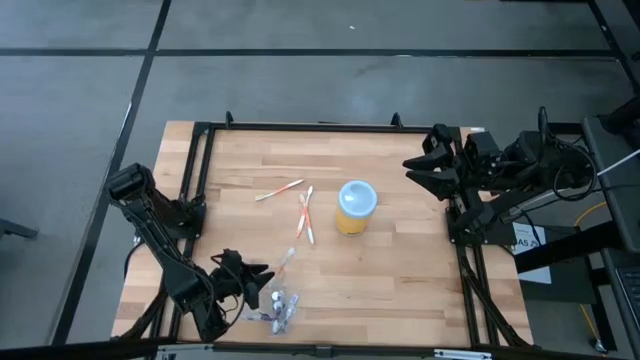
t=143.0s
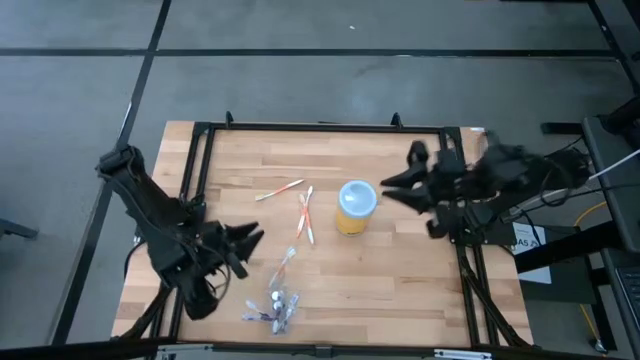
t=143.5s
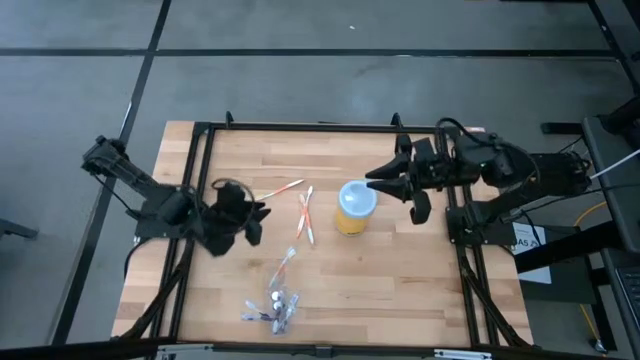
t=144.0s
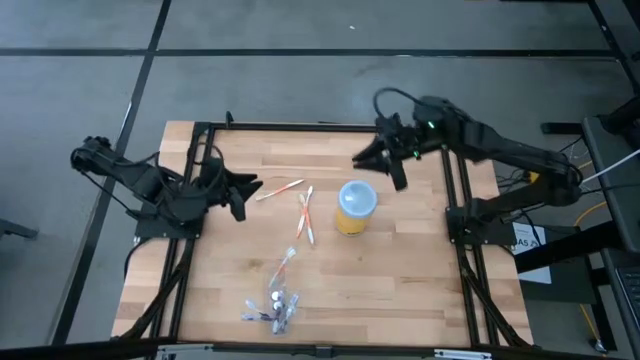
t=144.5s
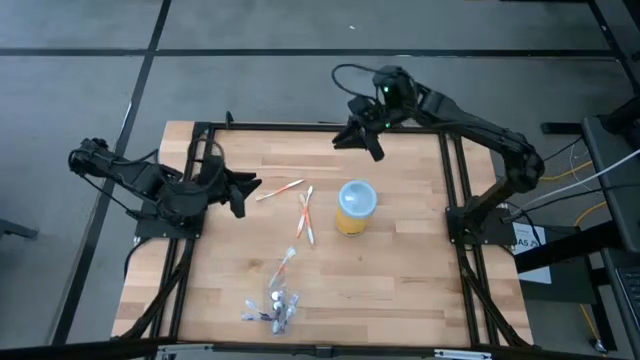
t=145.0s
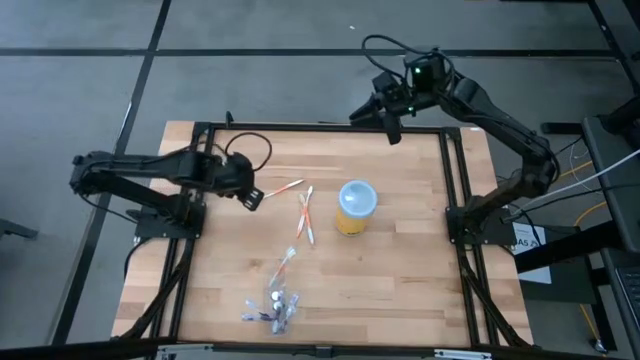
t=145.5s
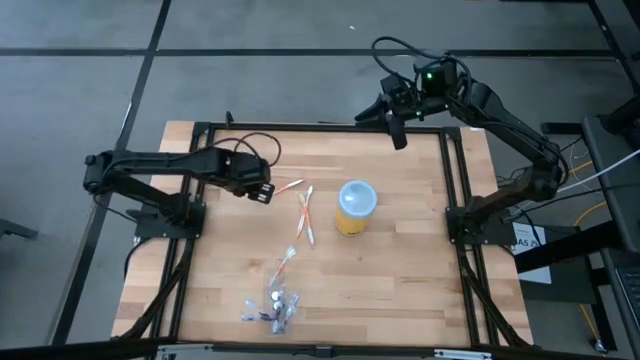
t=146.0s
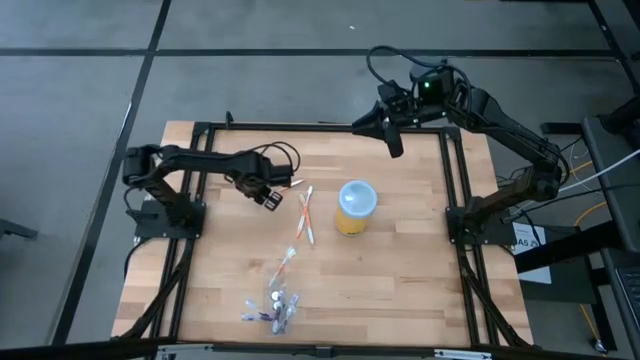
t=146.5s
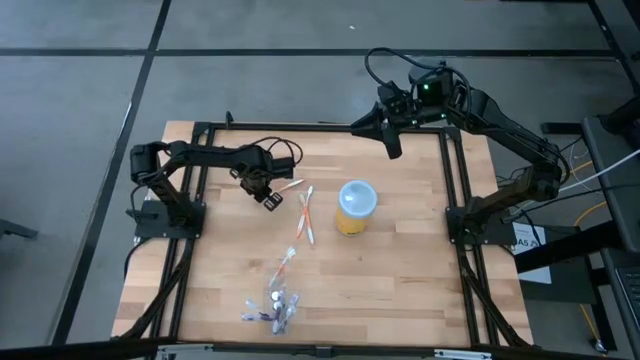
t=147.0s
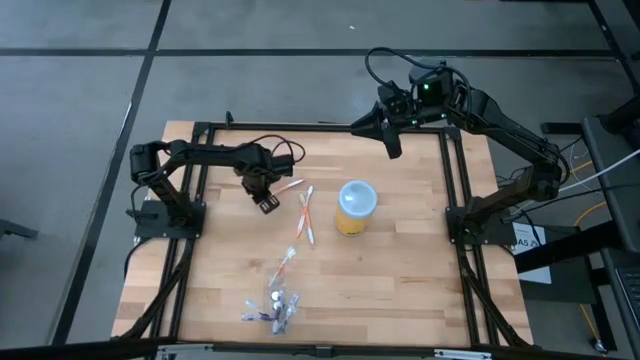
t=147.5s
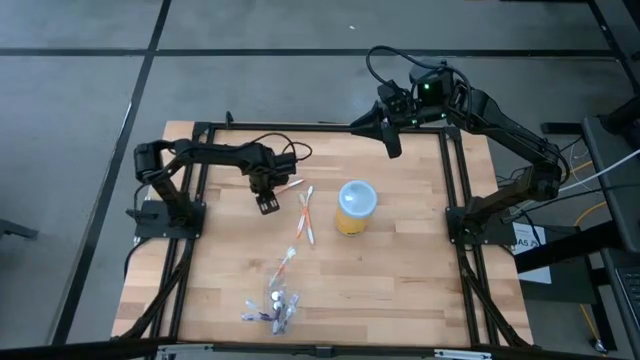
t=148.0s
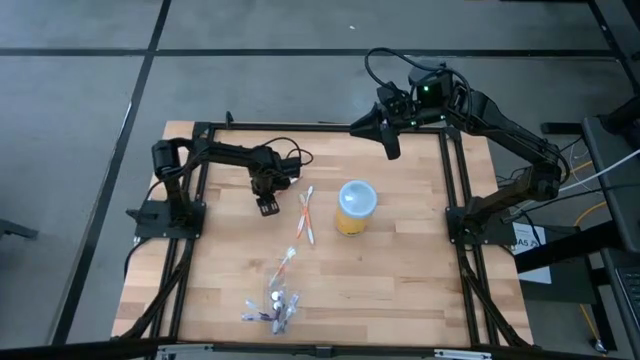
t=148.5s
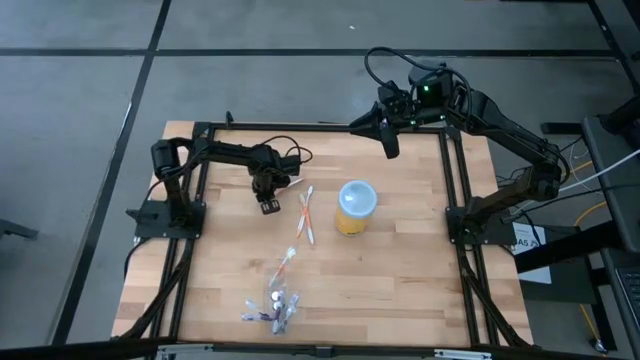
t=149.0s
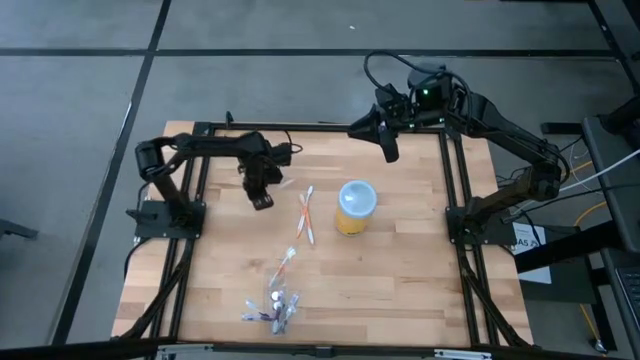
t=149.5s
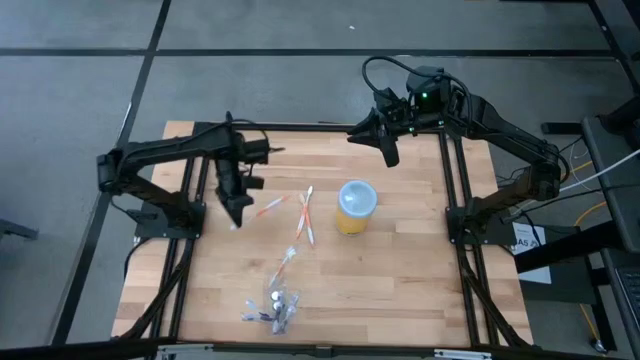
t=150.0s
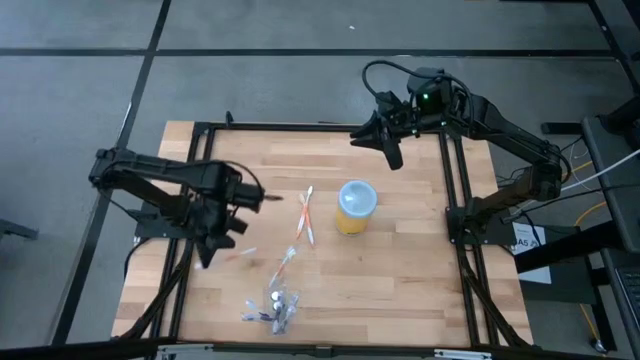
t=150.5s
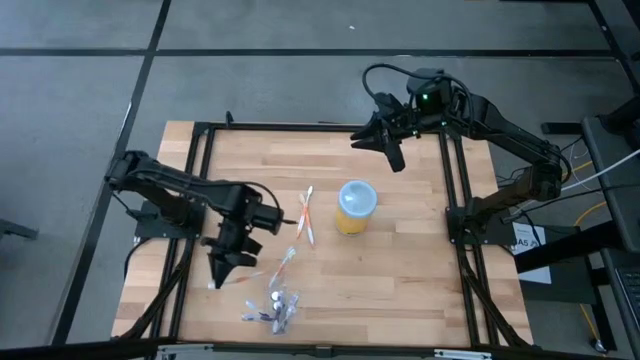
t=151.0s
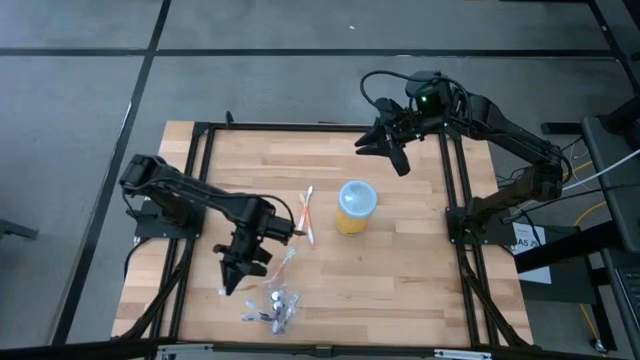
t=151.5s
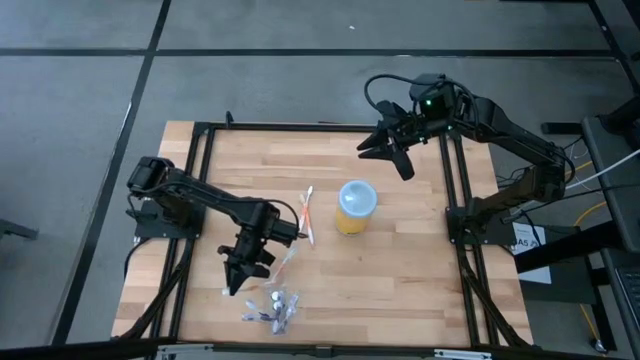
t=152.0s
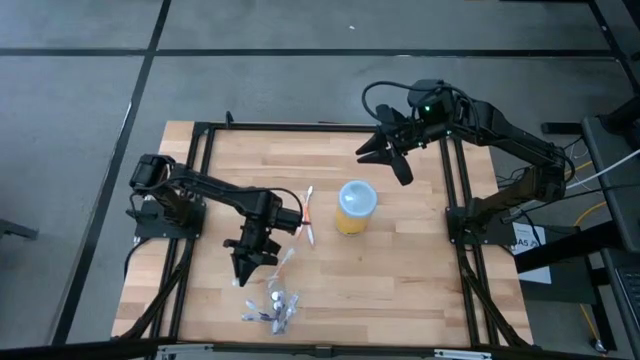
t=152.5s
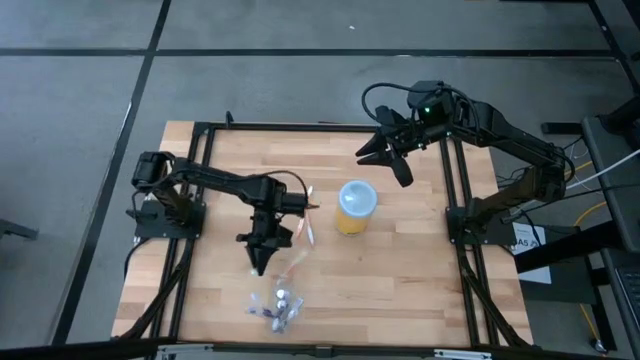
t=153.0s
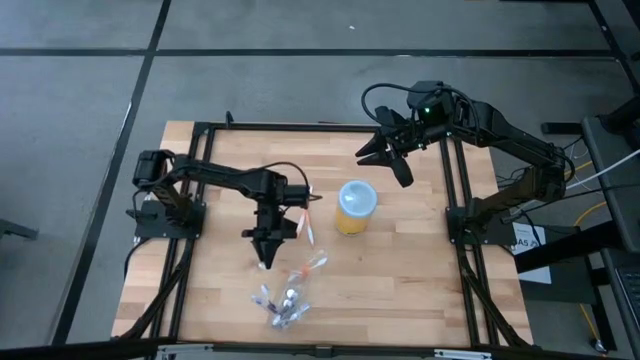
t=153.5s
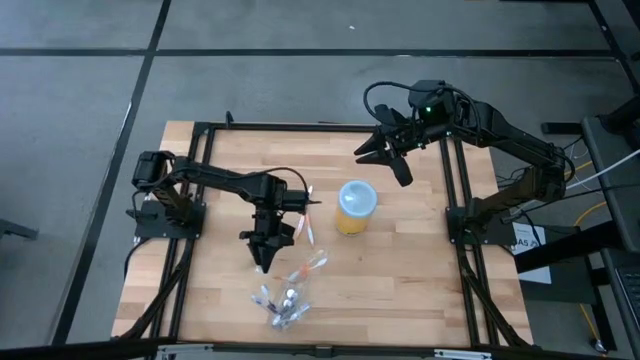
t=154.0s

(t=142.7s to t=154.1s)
Task: Pick & Place toothbrushing station
Put the top orange toothbrush into the left side of the transparent organizer

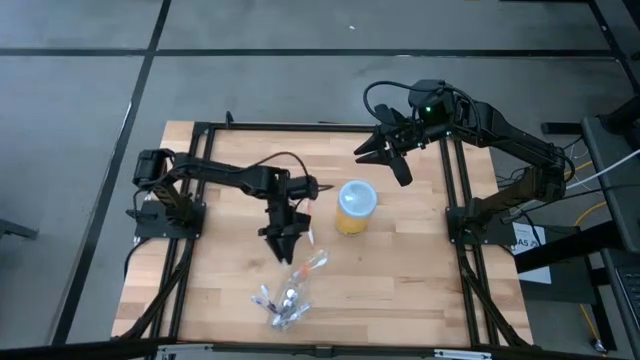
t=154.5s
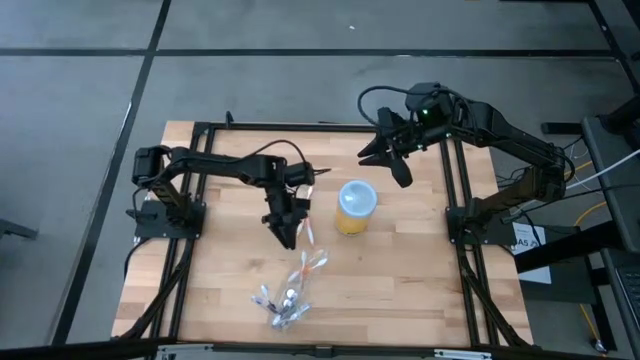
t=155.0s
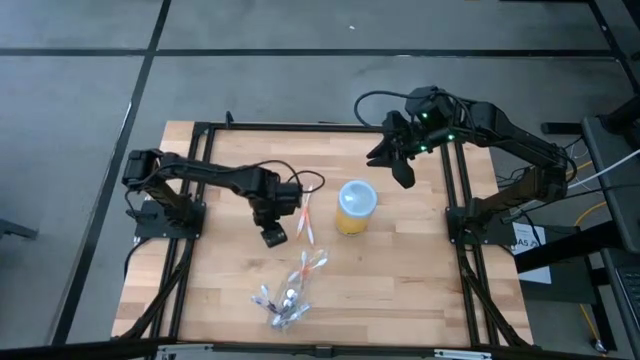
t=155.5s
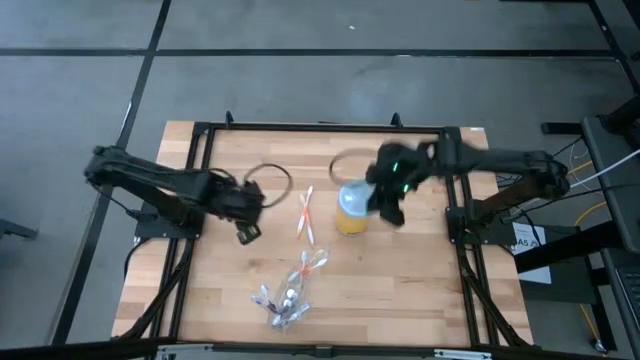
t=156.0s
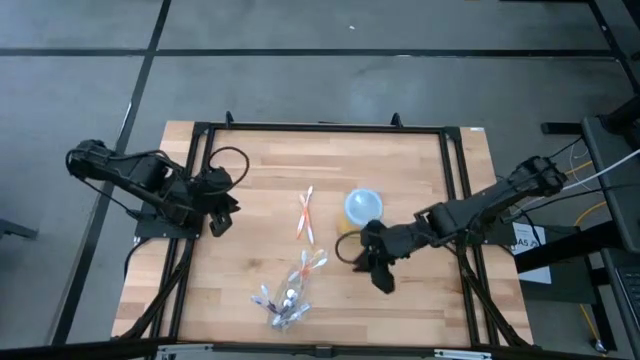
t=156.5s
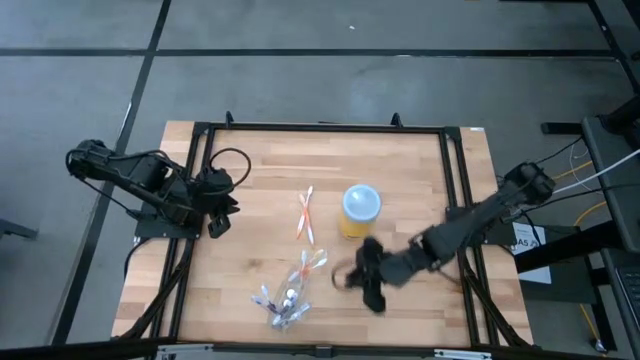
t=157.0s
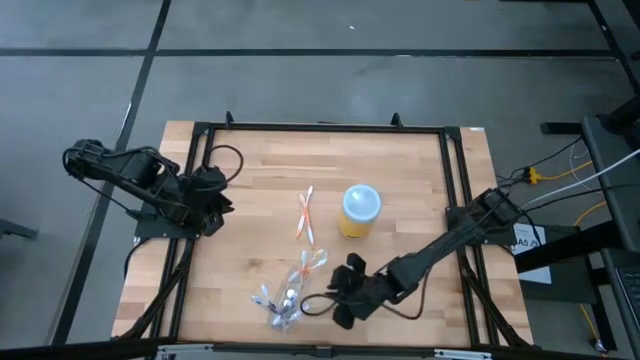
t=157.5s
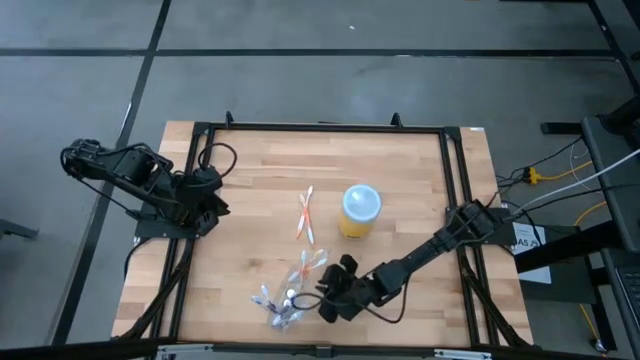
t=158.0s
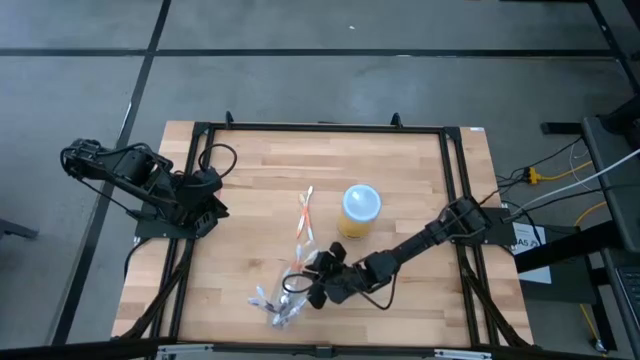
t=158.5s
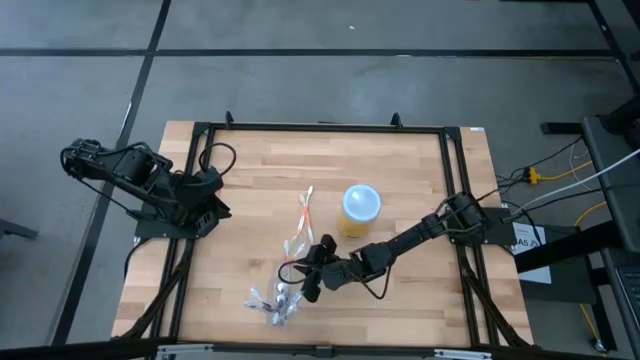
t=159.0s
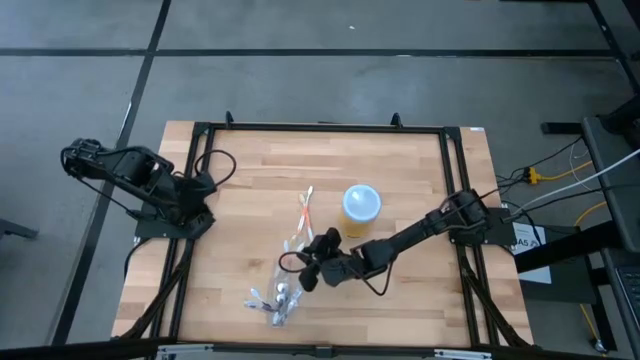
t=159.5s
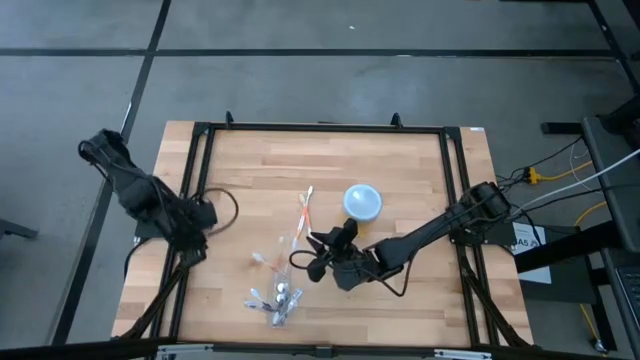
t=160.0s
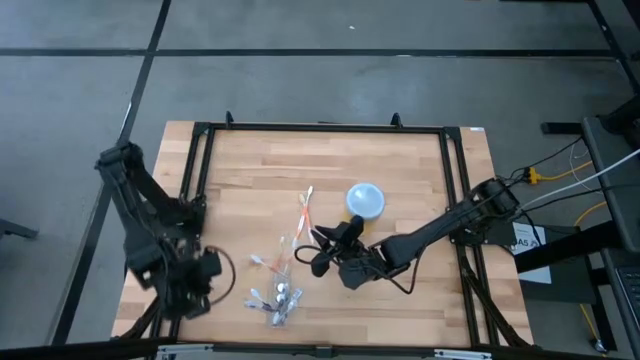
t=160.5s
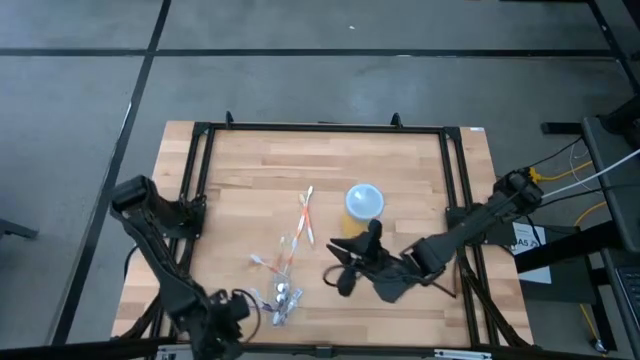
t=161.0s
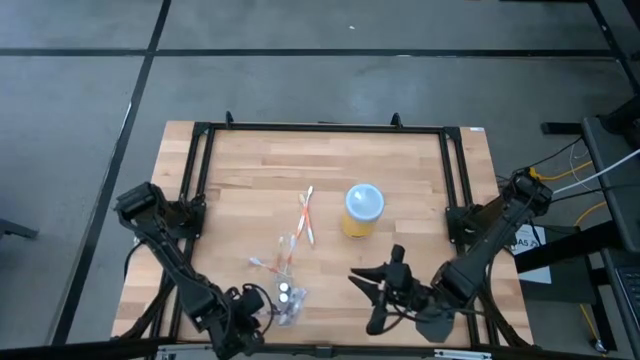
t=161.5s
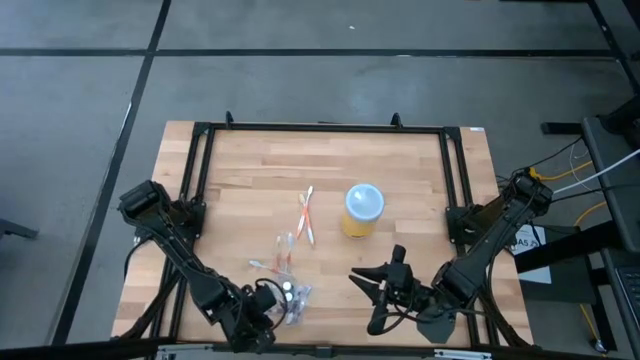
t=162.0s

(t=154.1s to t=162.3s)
Adjust the toothbrush holder

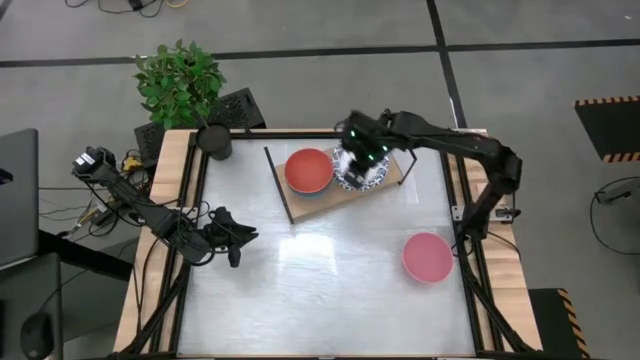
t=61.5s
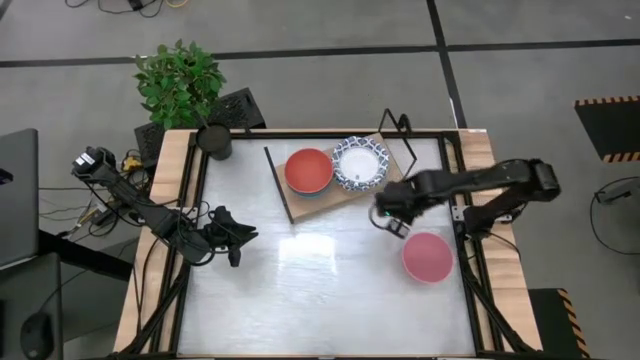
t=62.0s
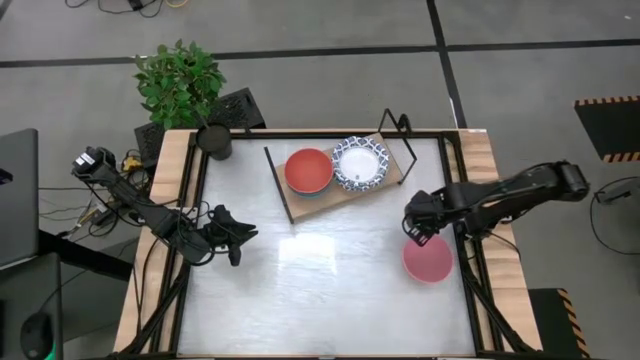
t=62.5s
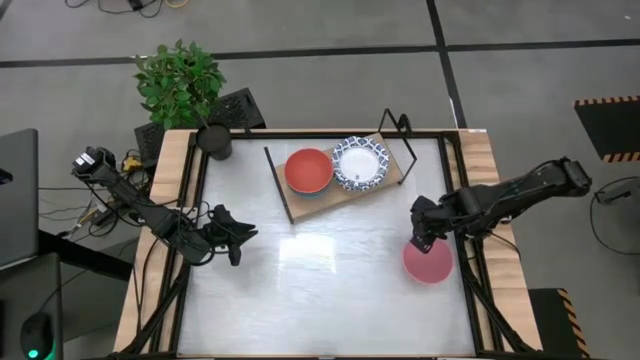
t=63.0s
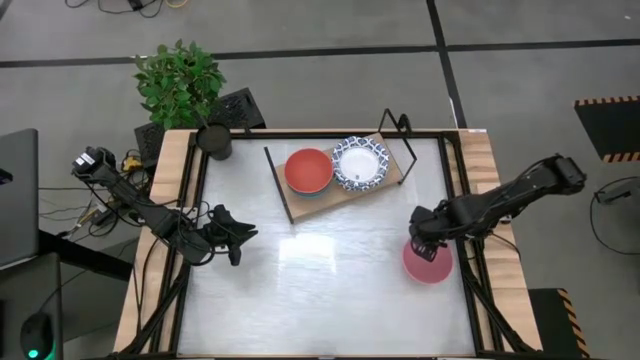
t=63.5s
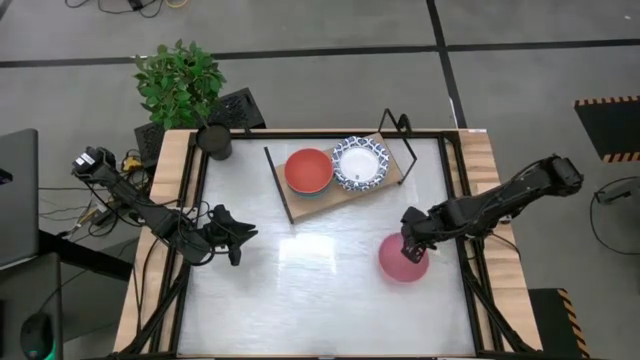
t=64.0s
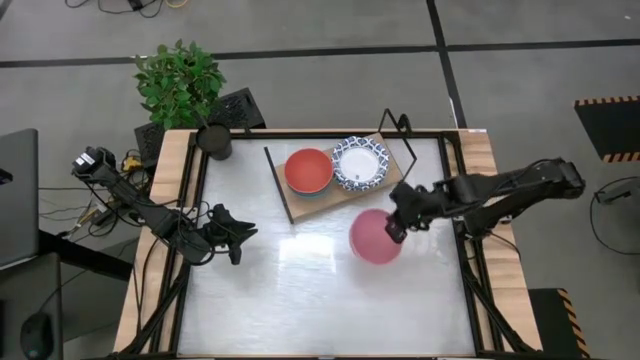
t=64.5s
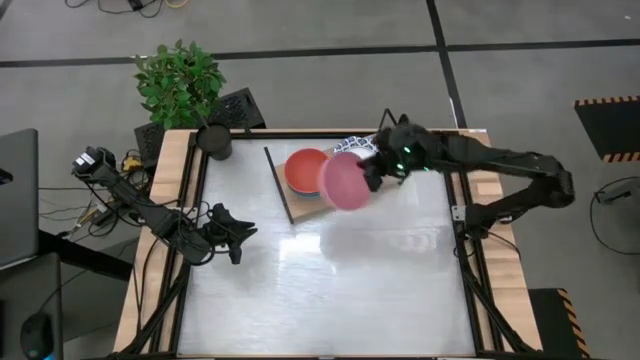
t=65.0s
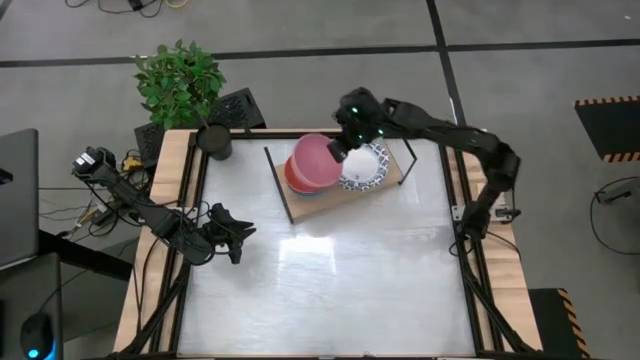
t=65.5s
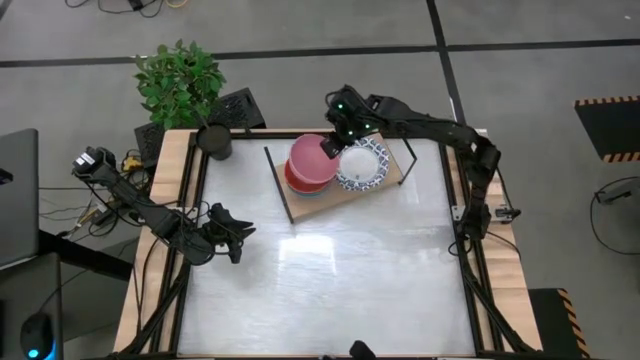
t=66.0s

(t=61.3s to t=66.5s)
Task: Place and stack bowls onto a shelf
Stack the pink bowl on top of the orange bowl
